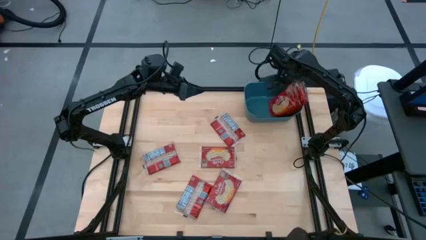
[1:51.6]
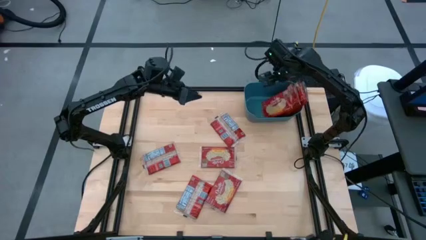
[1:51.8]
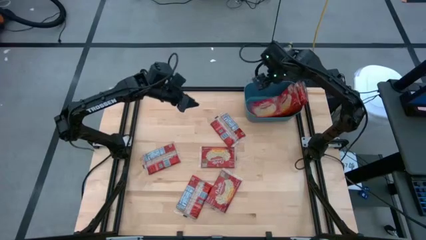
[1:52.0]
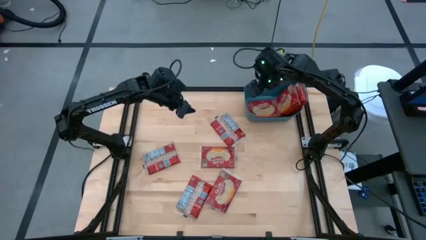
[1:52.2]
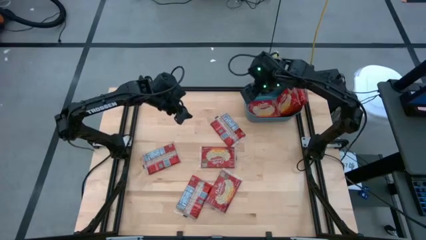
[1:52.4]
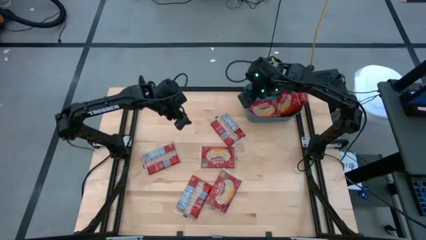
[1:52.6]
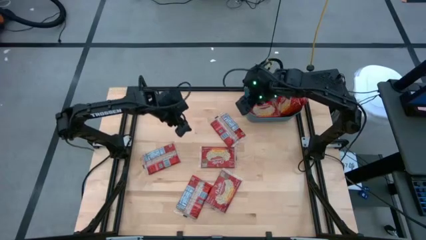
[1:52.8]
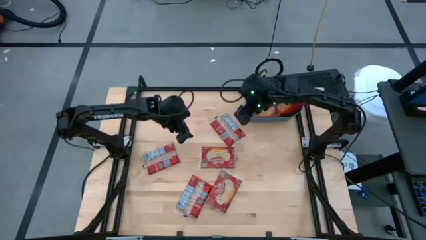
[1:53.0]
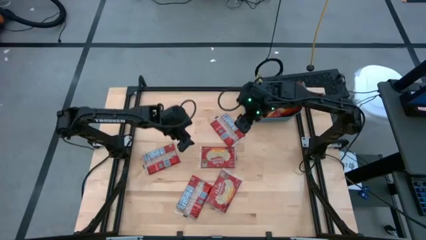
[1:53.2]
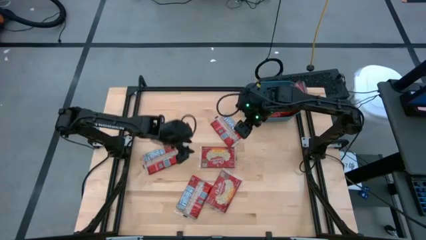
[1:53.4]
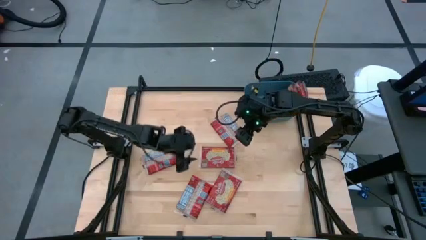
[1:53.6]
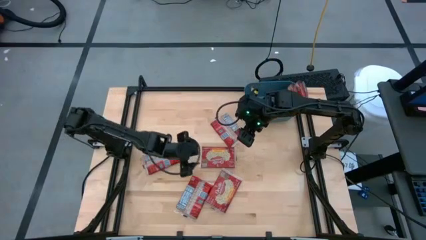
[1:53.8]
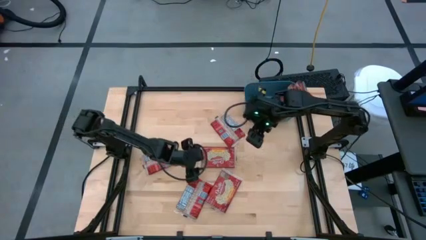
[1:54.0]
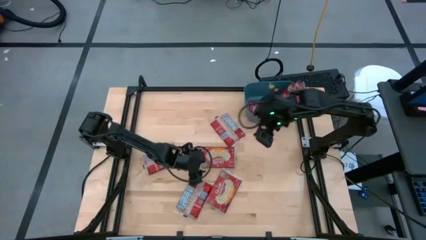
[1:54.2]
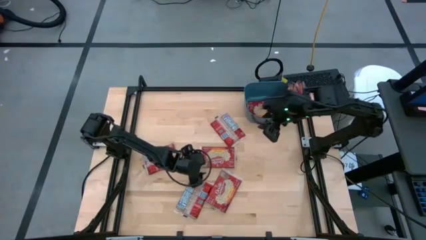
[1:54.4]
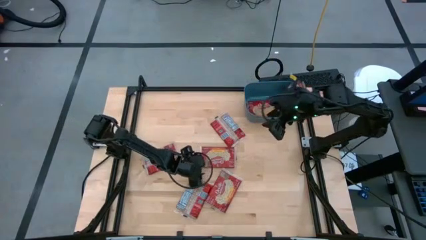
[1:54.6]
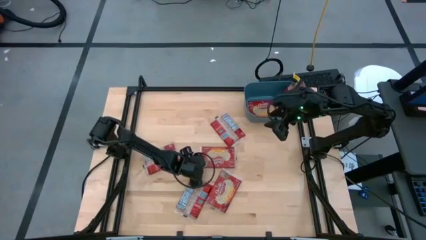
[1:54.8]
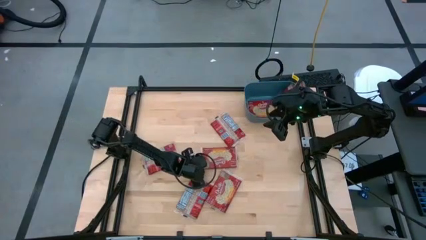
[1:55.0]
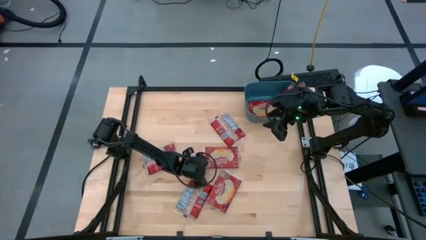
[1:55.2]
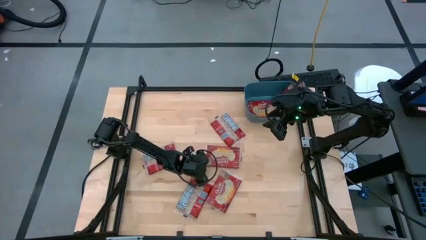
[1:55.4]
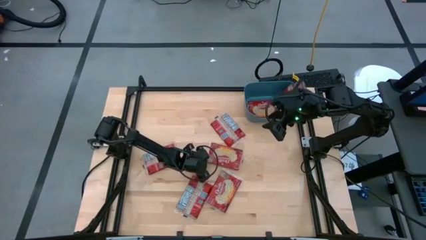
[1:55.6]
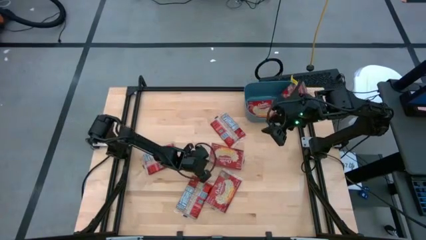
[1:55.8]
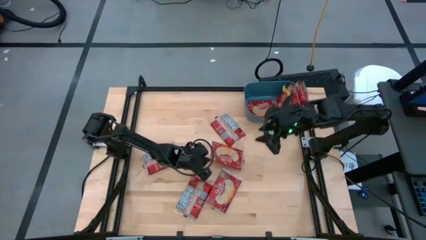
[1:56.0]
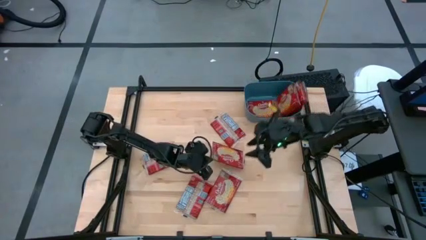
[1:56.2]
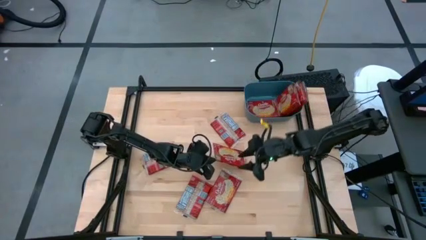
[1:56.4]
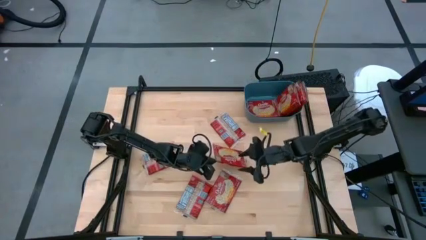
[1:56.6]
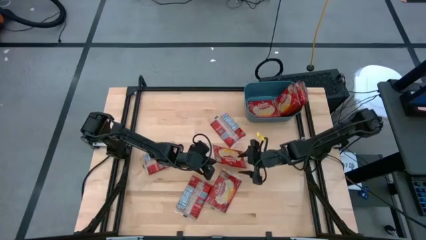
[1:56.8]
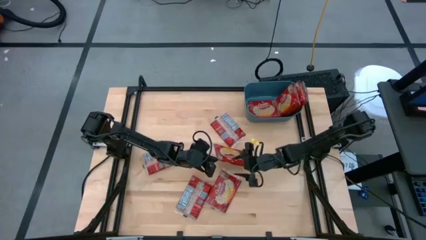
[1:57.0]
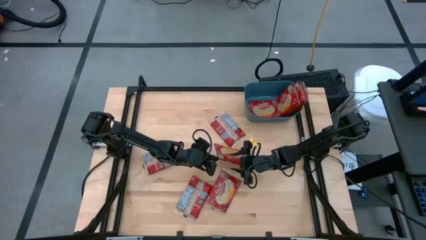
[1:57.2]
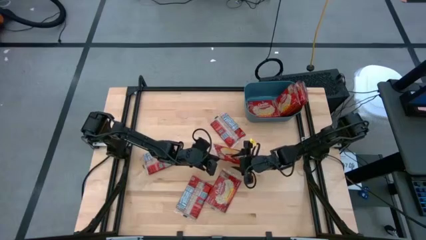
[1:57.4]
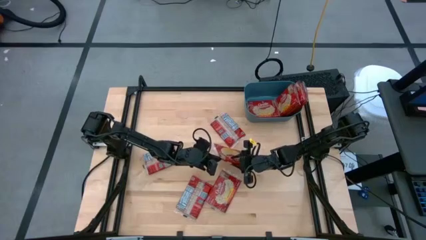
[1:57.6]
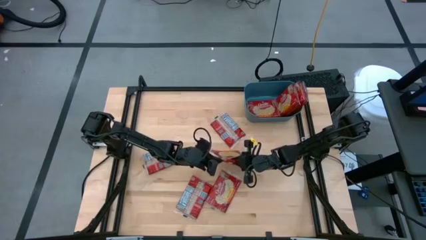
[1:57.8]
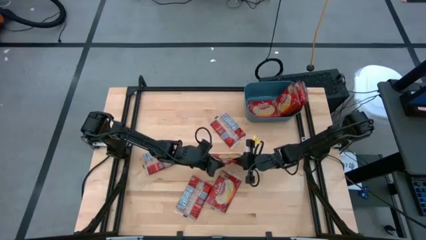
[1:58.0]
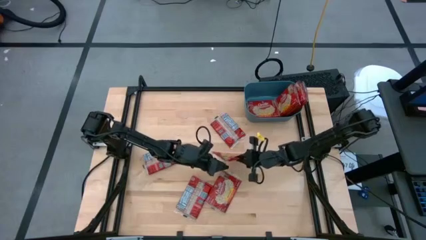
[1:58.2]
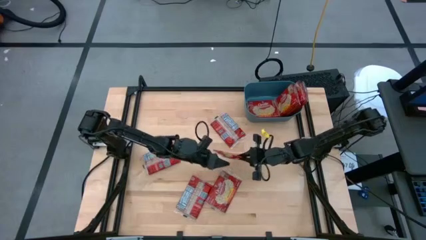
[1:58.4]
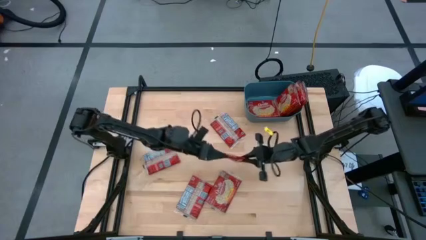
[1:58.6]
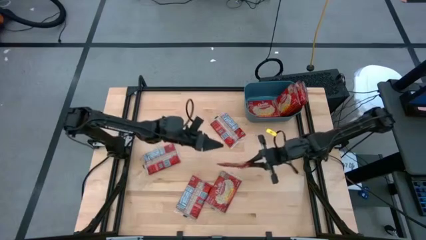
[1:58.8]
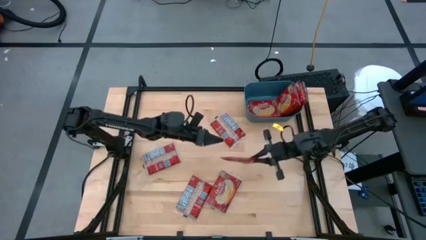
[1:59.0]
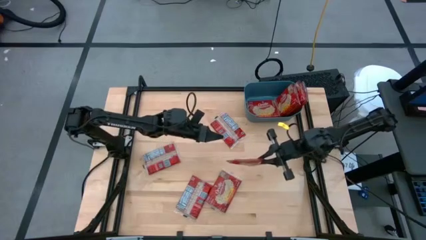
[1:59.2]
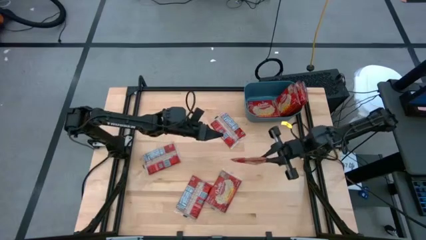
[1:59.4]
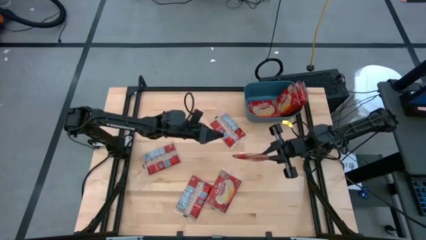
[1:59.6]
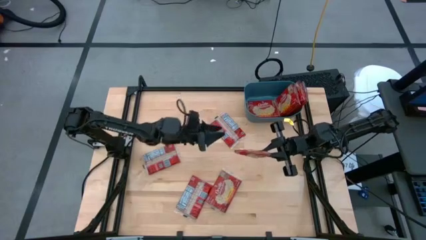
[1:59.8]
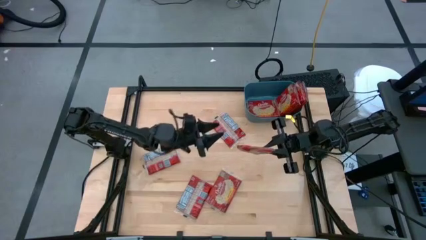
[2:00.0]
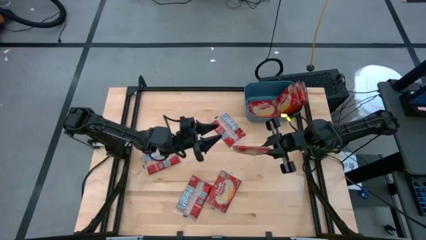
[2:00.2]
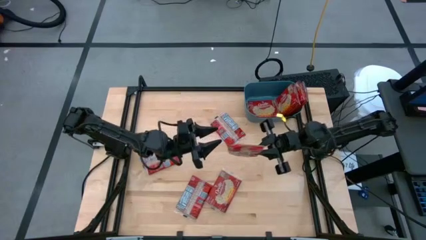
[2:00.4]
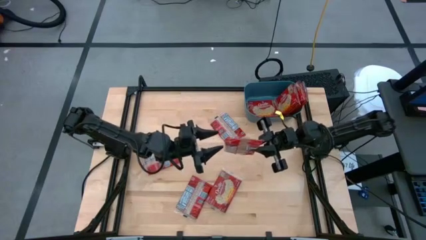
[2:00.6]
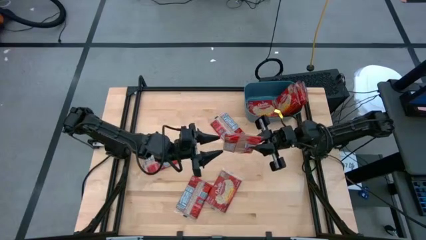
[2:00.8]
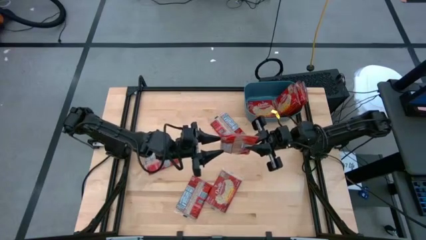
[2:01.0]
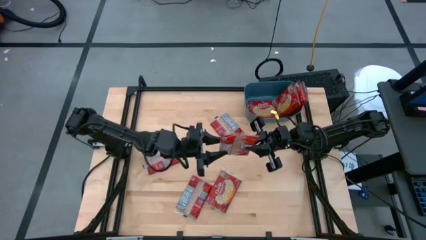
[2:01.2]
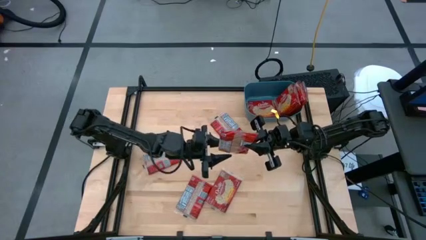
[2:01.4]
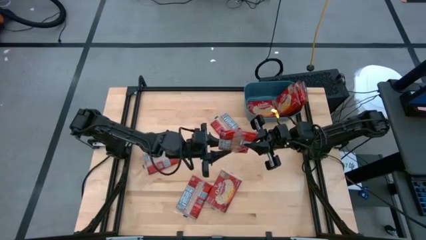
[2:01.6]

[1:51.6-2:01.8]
Task: Sort popcorn bags into baskets
Put the popcorn bag into the blue bin

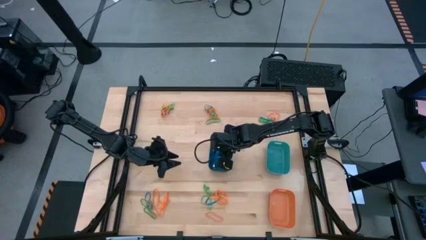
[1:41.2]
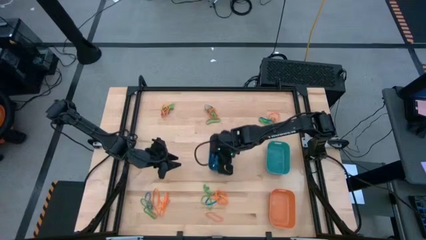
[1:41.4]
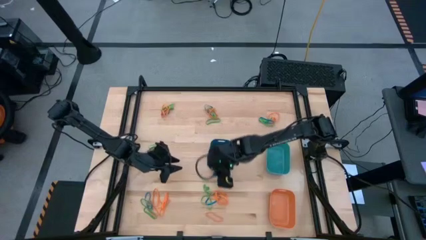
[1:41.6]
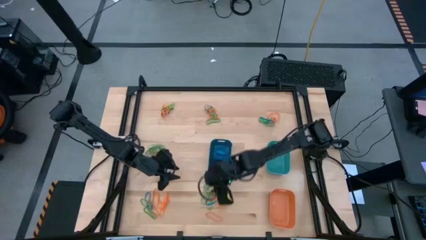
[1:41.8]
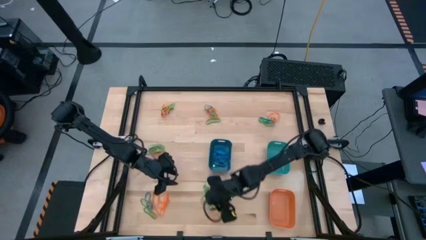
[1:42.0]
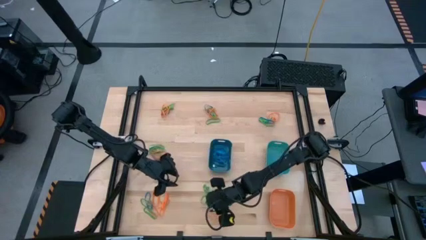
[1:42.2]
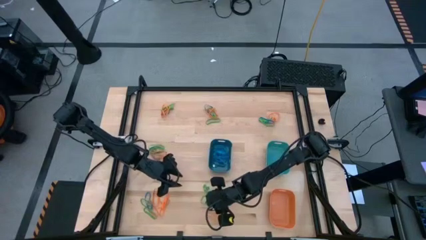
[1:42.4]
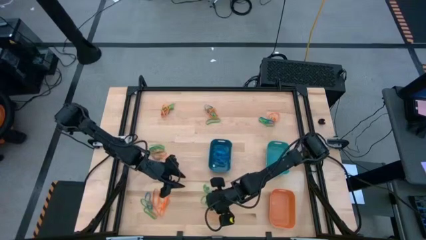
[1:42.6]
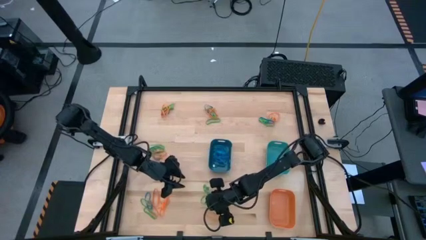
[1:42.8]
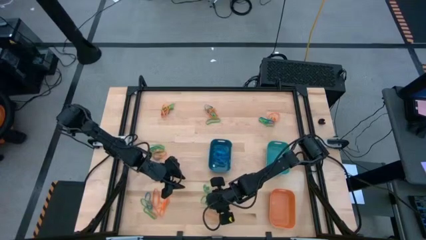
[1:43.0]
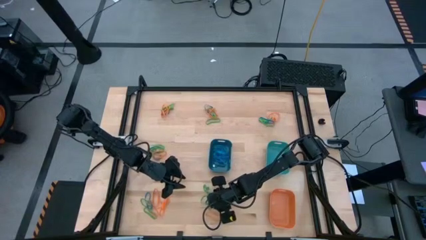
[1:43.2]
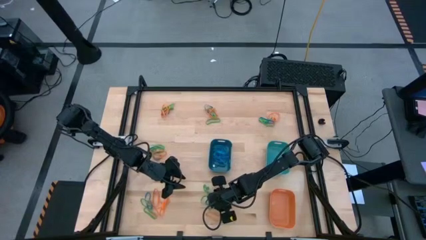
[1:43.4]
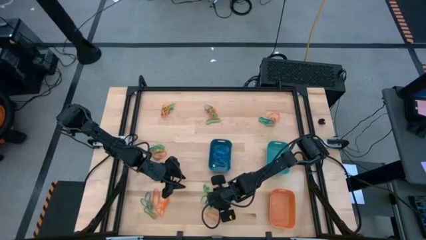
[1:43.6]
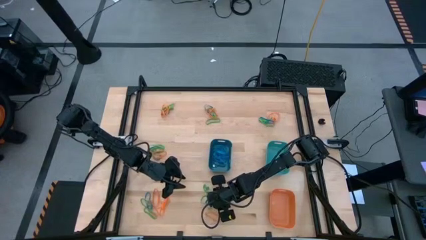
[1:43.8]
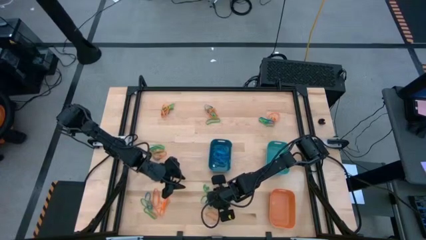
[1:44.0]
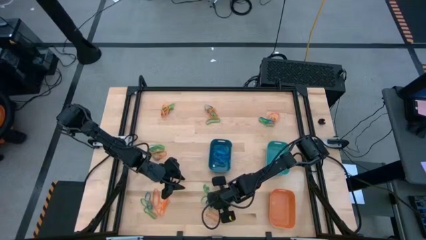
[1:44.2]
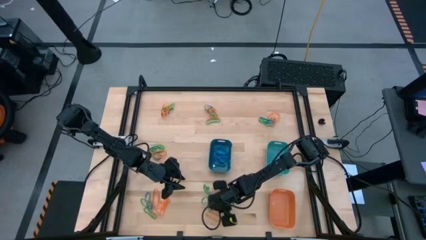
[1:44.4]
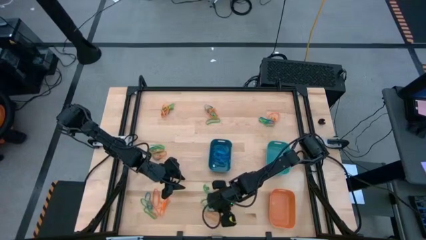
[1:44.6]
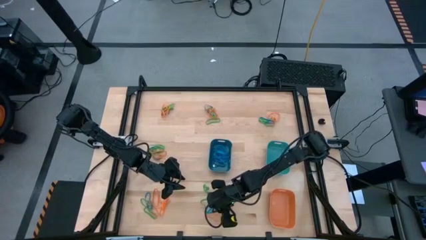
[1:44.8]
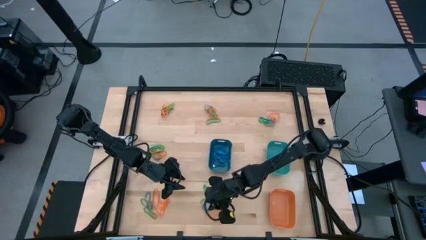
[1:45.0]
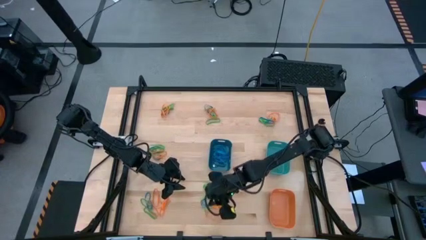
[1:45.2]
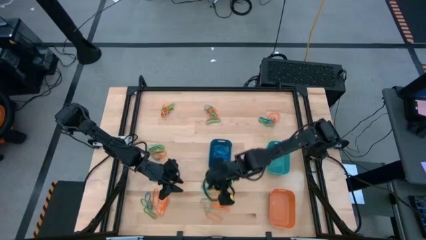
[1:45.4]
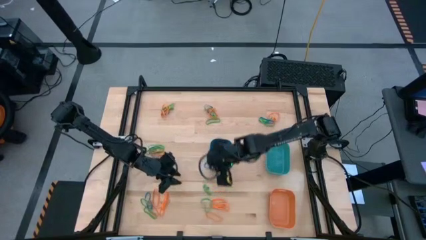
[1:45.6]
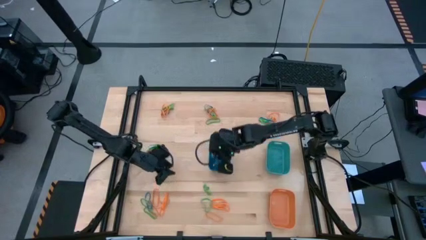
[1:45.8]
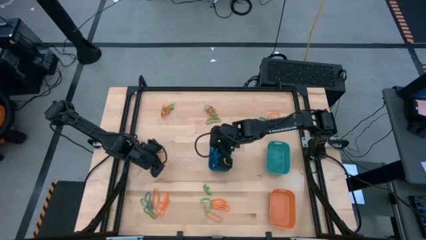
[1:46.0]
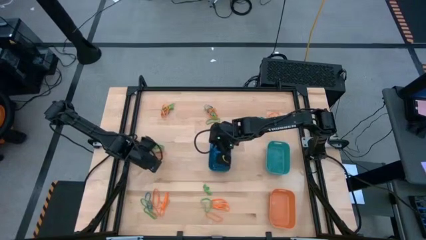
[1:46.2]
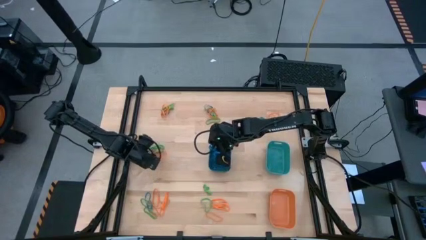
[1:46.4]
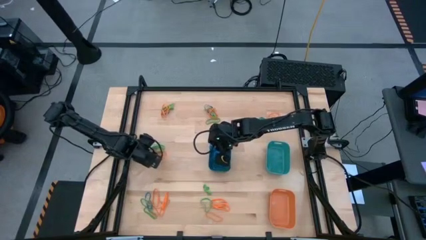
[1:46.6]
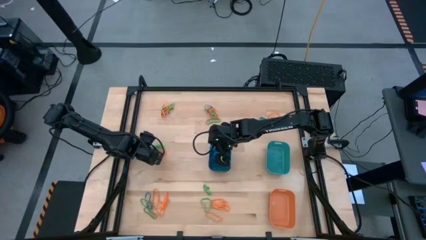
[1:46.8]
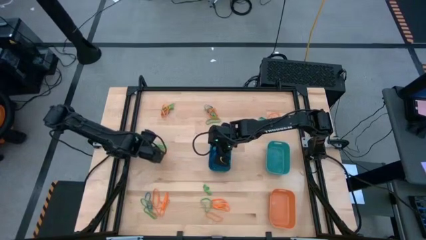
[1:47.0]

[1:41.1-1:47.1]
Task: Sort rubber bands into baskets
Put the blue rubberband into the blue bin

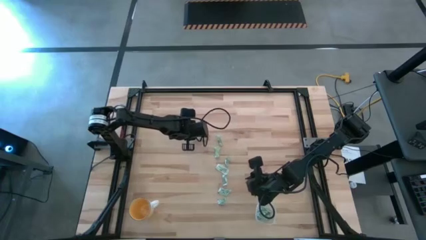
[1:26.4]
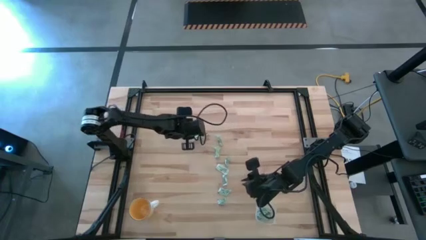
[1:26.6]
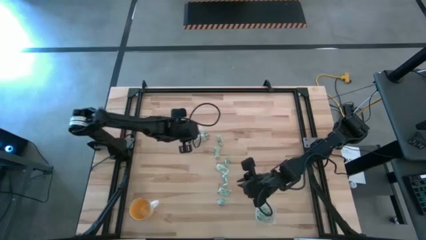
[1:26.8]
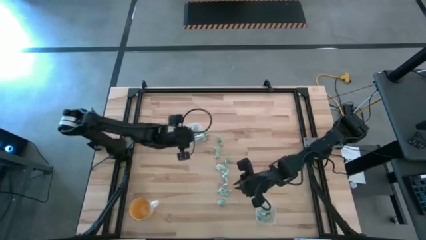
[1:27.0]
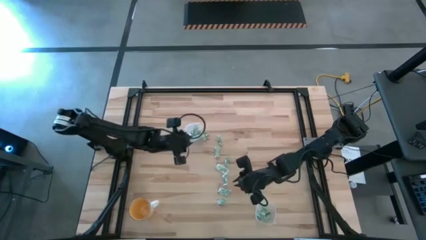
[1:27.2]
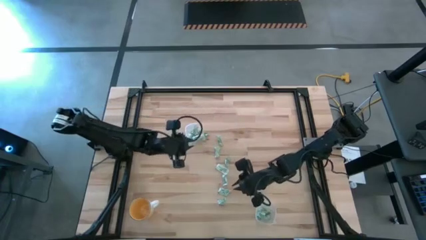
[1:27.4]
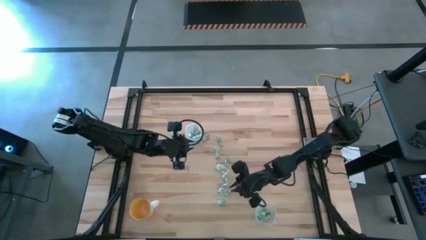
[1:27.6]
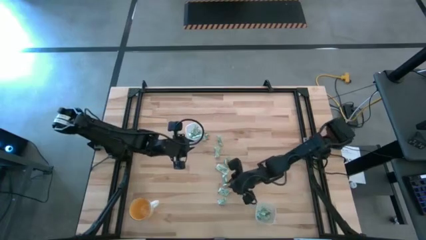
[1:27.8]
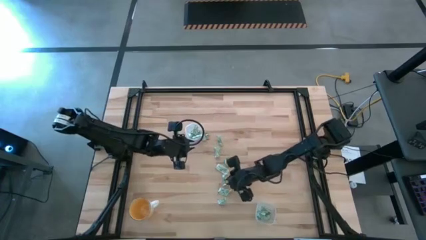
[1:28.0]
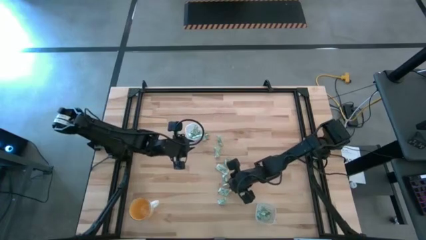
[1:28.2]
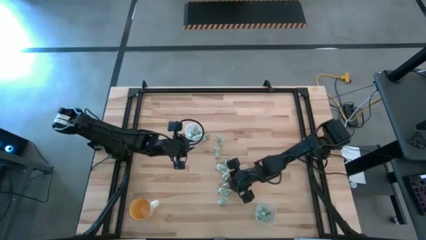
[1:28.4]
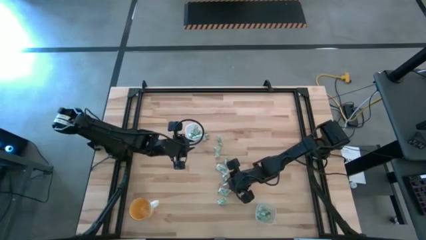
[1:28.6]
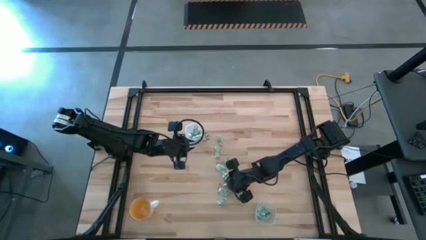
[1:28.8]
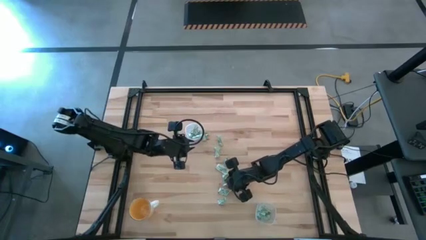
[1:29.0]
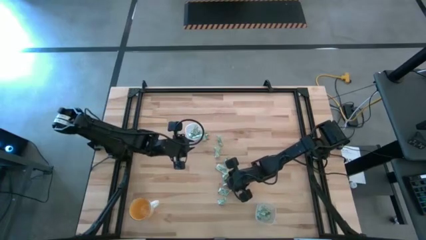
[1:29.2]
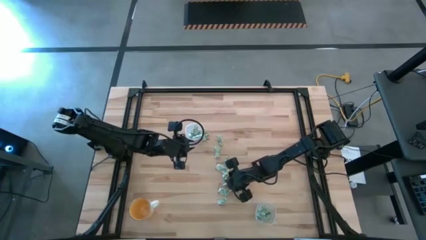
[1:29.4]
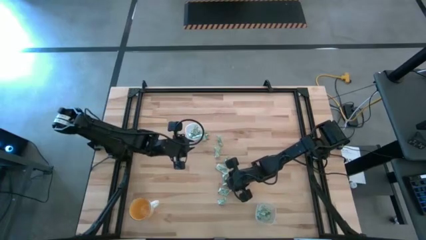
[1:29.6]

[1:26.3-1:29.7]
Task: Pick and place Stevia / Truvia into bins
Put the stevia packet into the bottom transparent container
